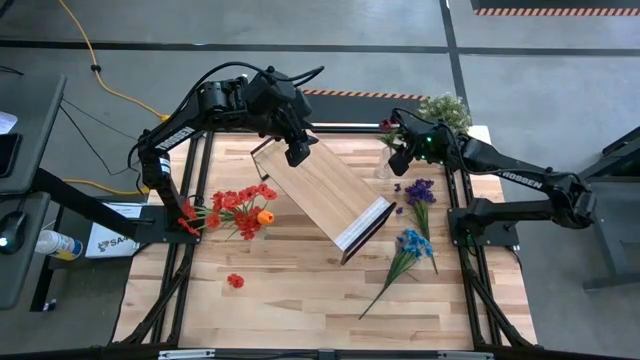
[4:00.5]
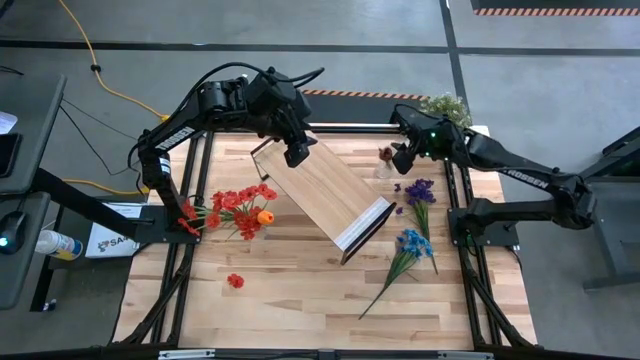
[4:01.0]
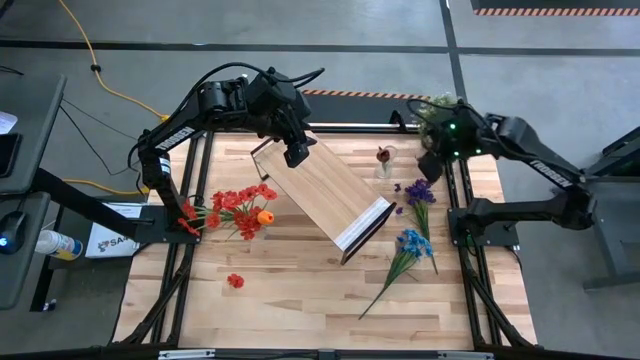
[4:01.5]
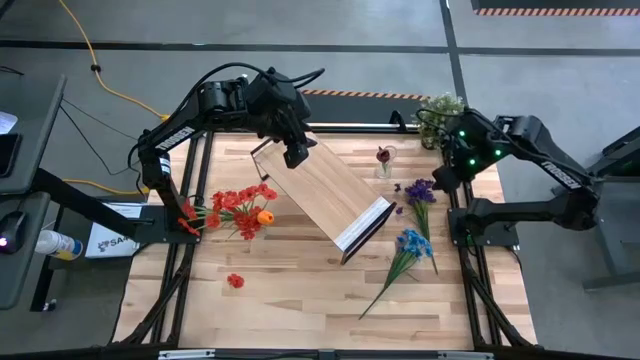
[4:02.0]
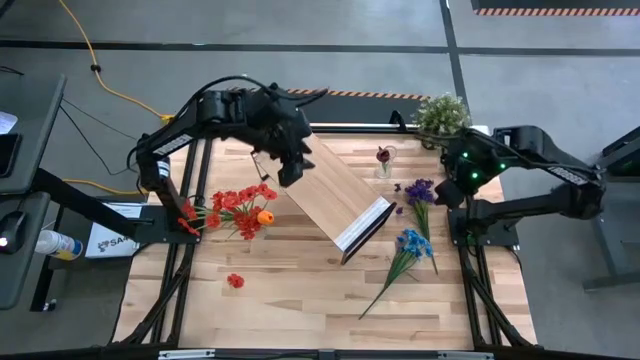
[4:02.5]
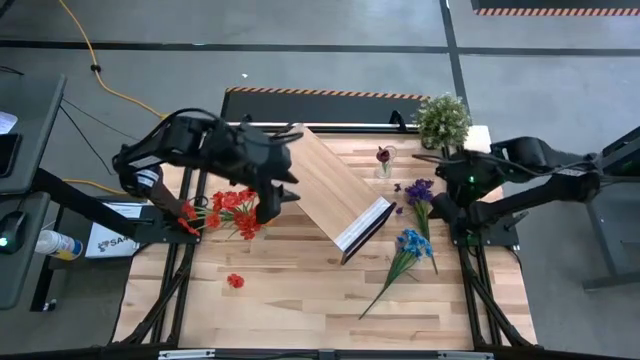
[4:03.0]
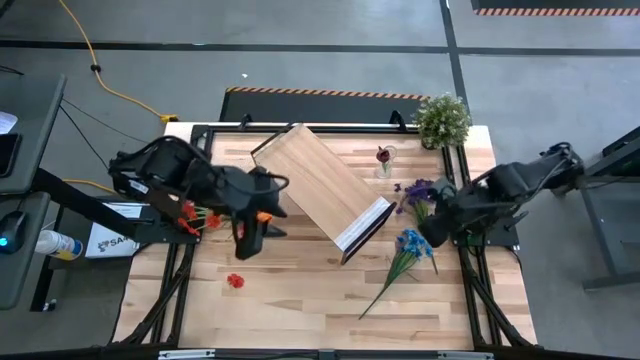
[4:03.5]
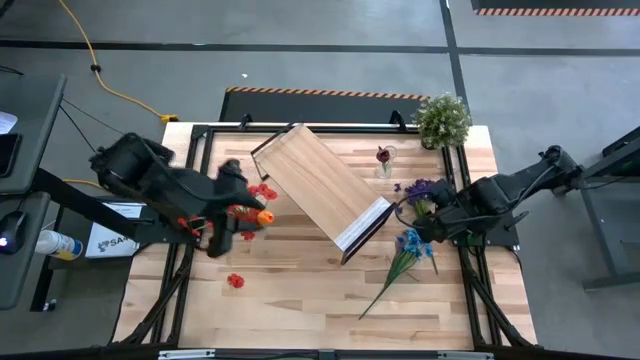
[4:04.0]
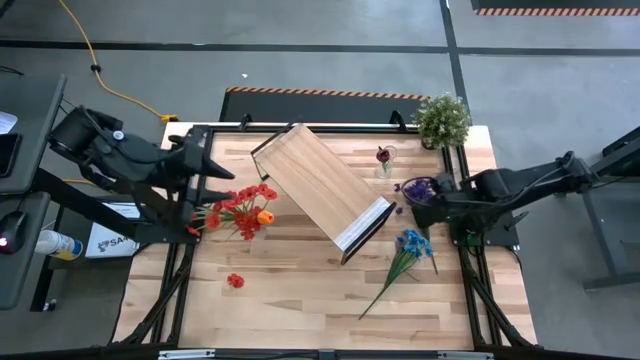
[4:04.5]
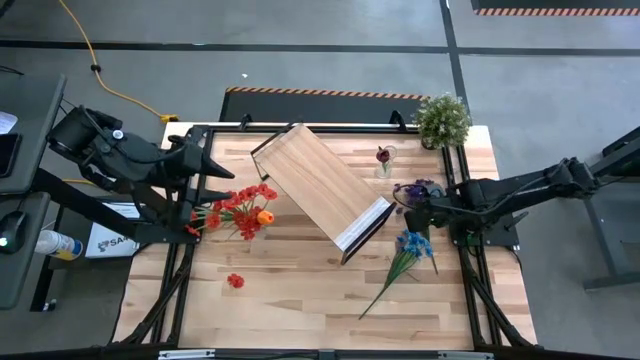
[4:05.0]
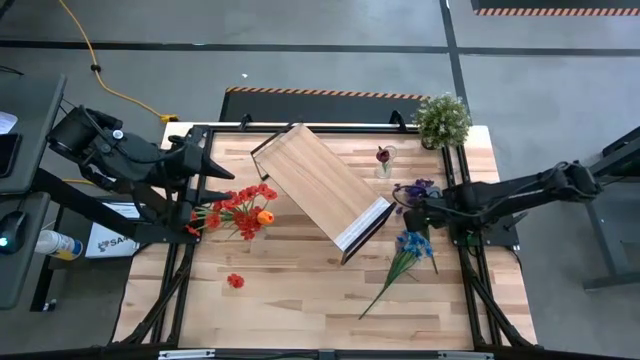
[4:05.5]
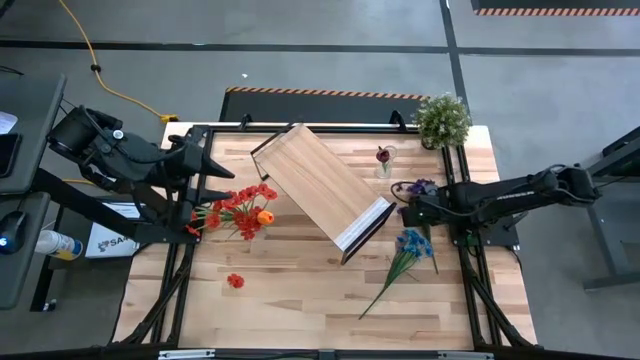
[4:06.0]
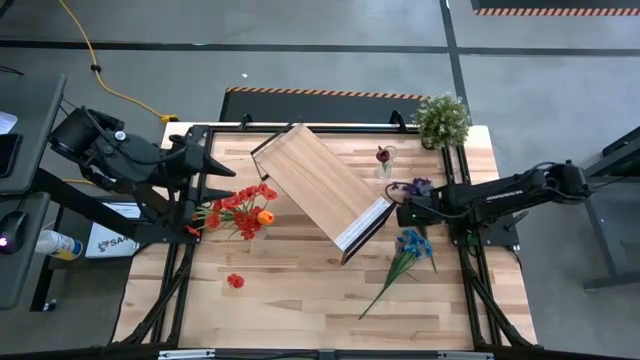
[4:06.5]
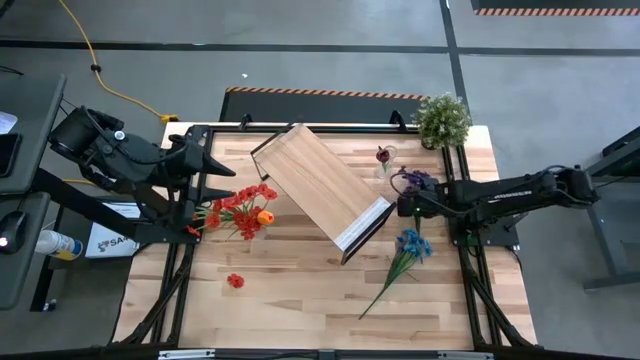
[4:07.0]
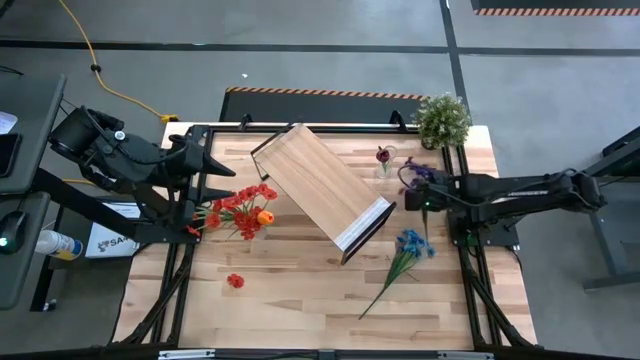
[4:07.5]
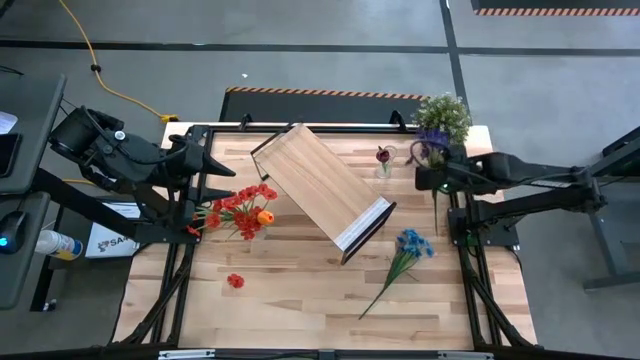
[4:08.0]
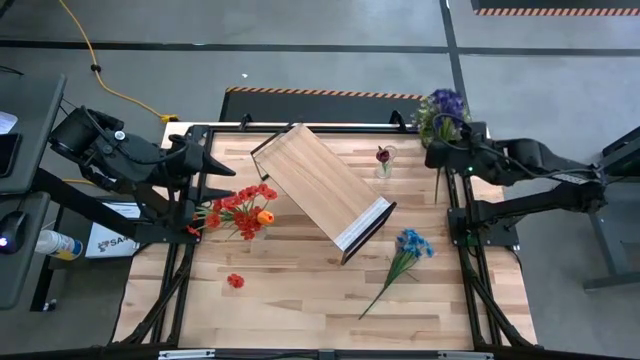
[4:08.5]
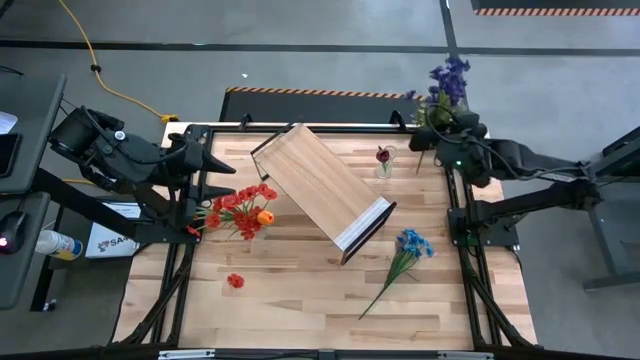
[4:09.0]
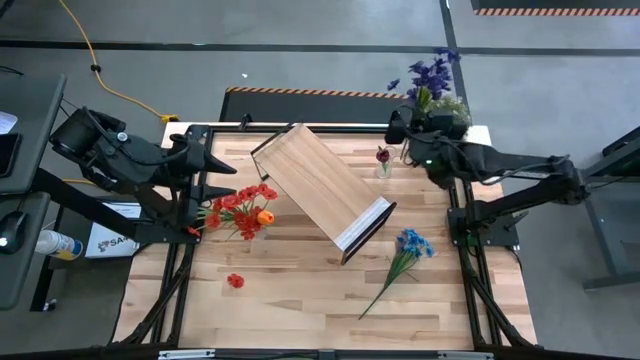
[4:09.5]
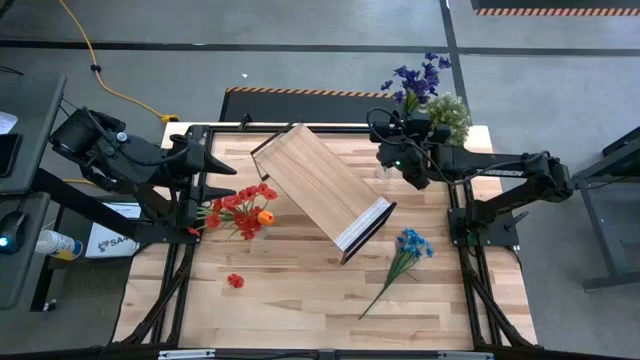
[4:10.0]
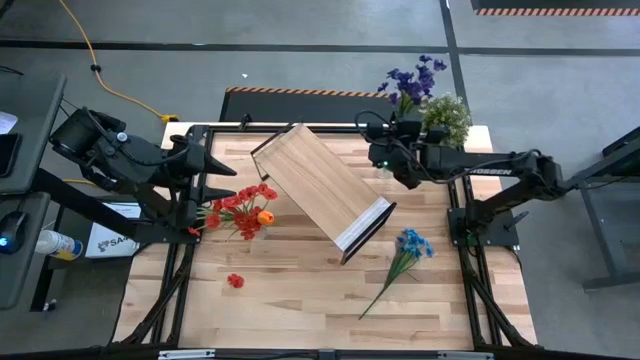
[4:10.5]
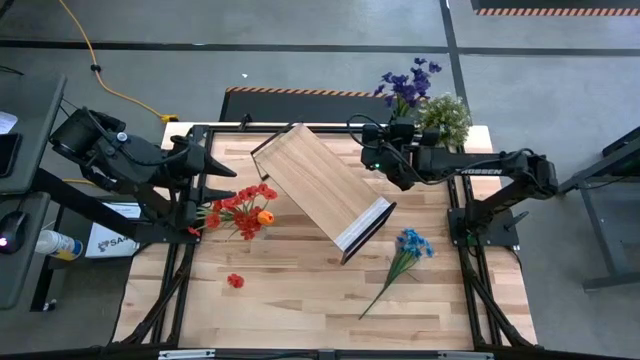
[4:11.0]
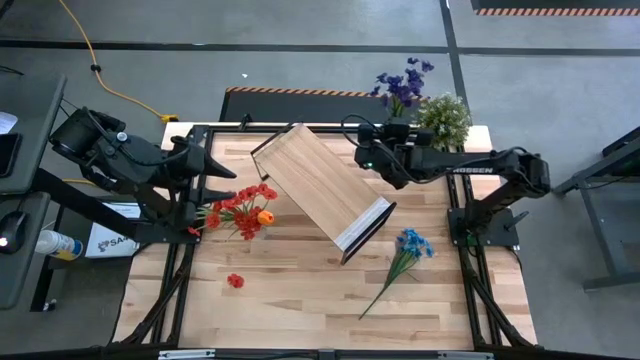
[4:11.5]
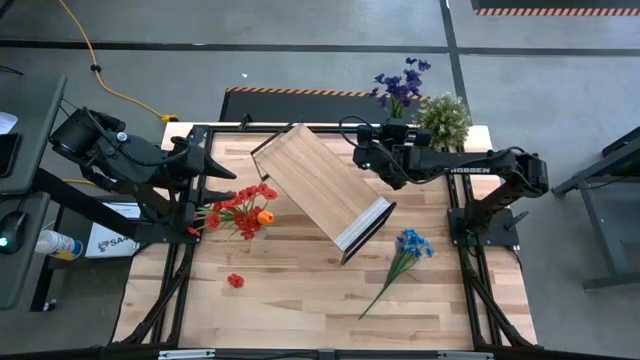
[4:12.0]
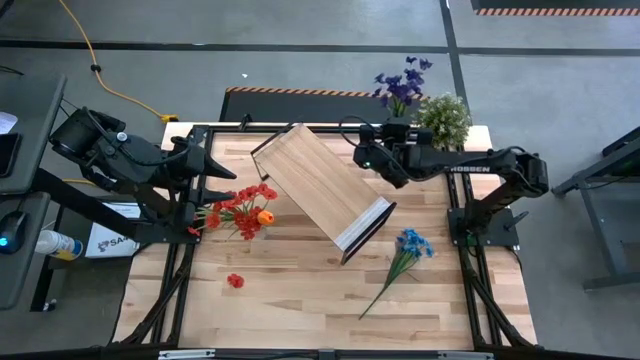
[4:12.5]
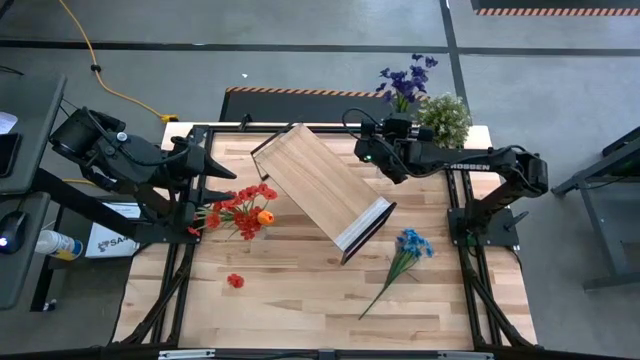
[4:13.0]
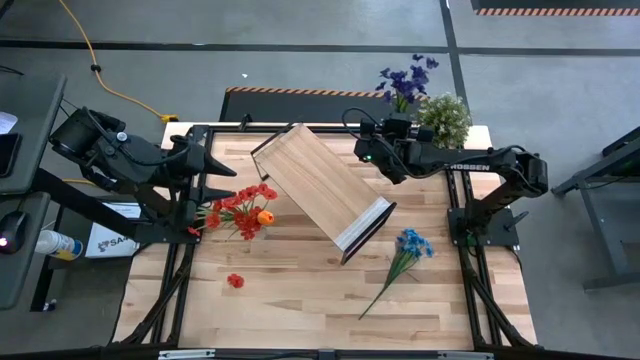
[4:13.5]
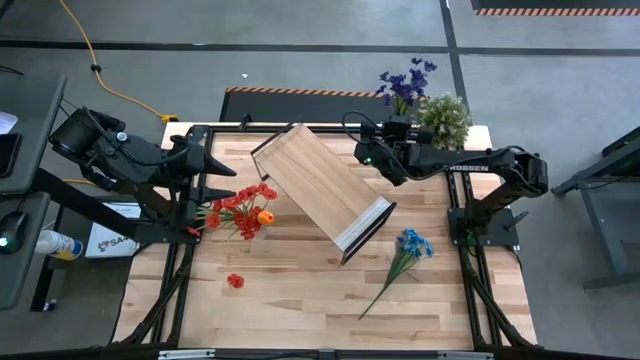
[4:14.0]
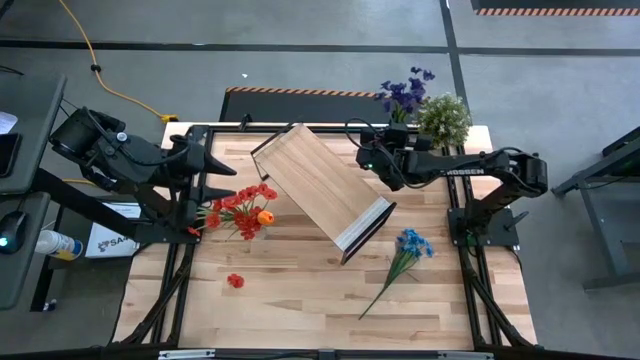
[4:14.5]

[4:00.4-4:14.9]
Task: Pick and place flowers into a vace then onto a shelf
Put the purple flowers into the top transparent vase

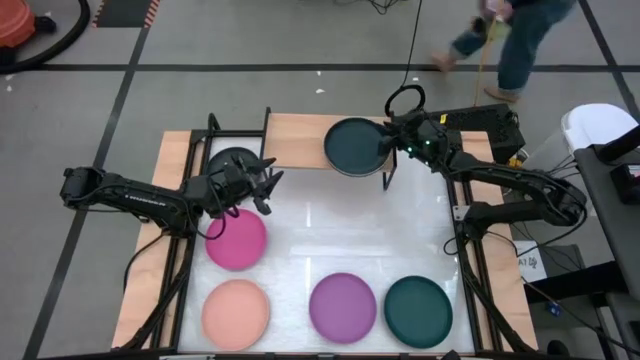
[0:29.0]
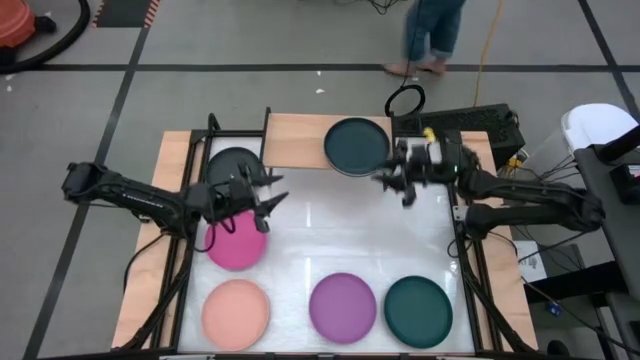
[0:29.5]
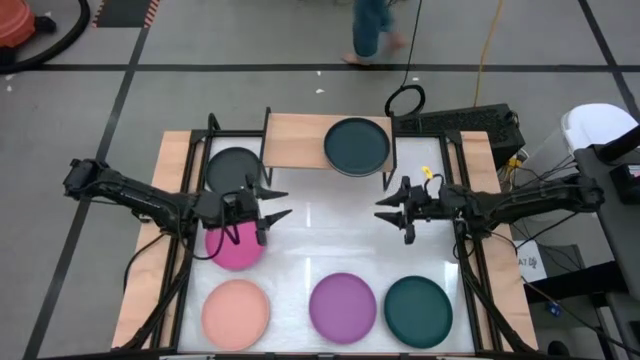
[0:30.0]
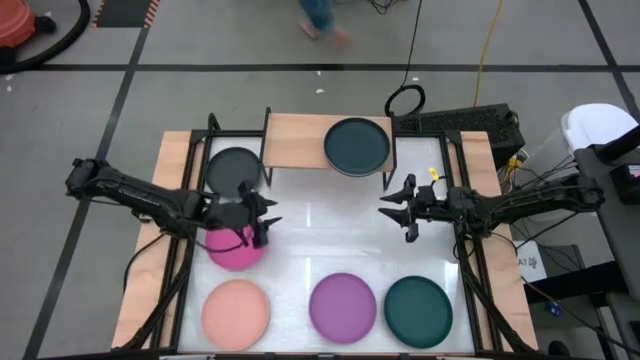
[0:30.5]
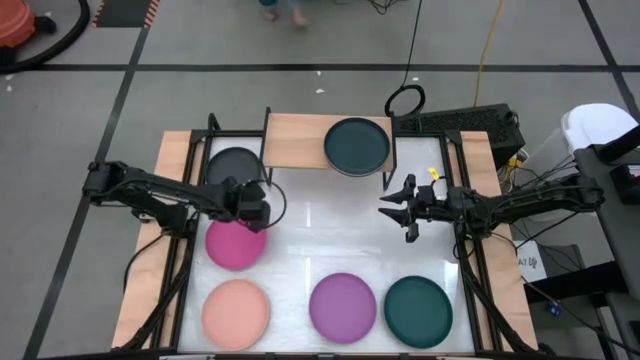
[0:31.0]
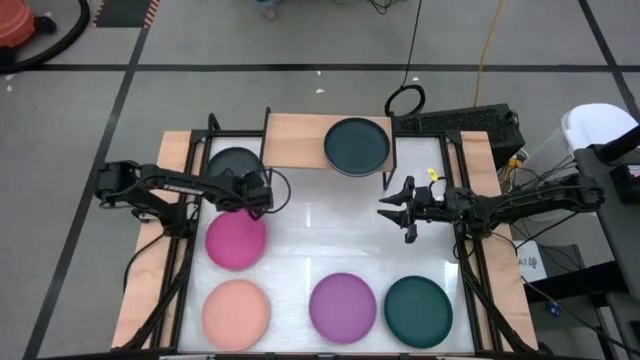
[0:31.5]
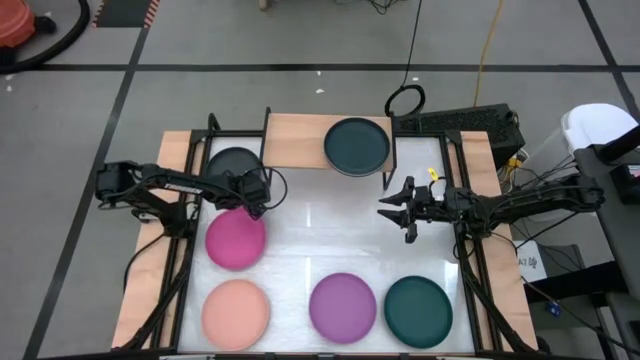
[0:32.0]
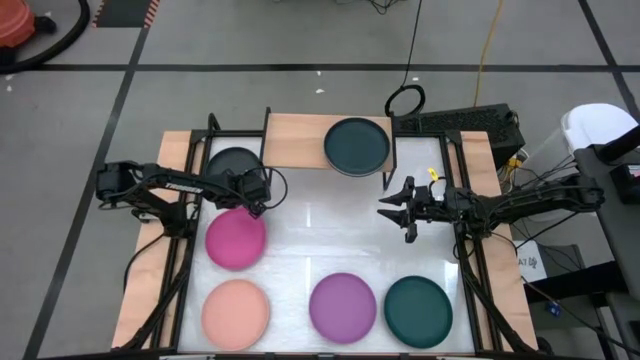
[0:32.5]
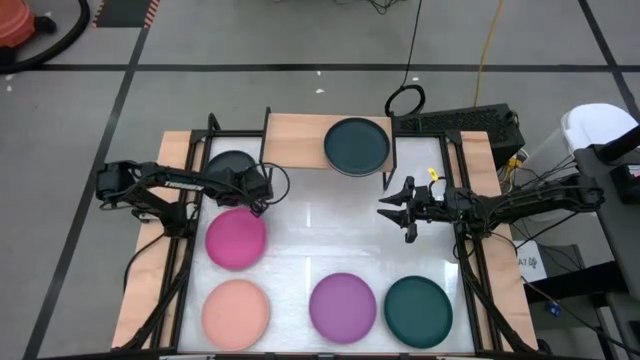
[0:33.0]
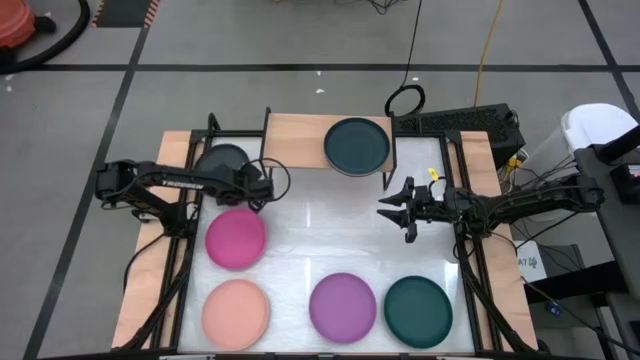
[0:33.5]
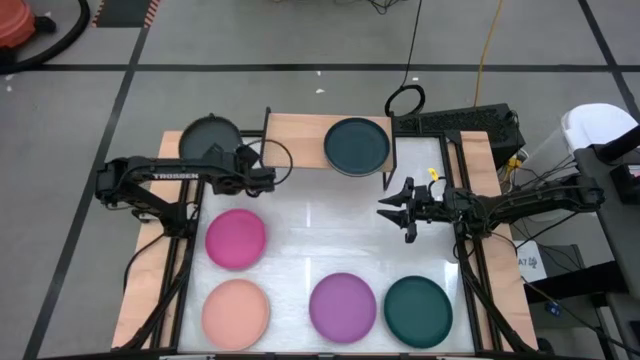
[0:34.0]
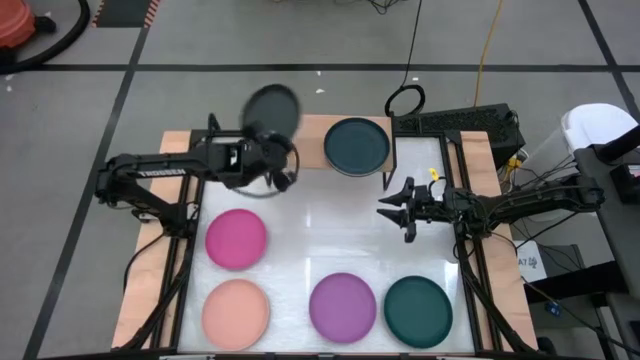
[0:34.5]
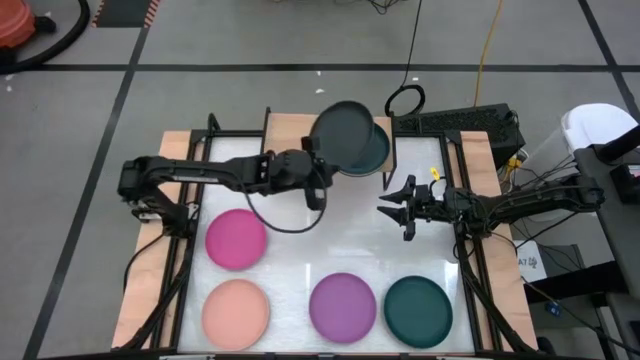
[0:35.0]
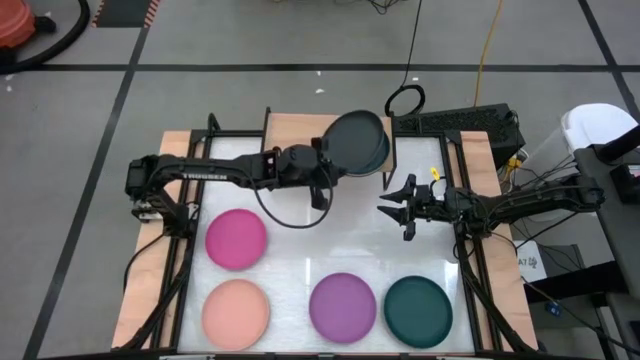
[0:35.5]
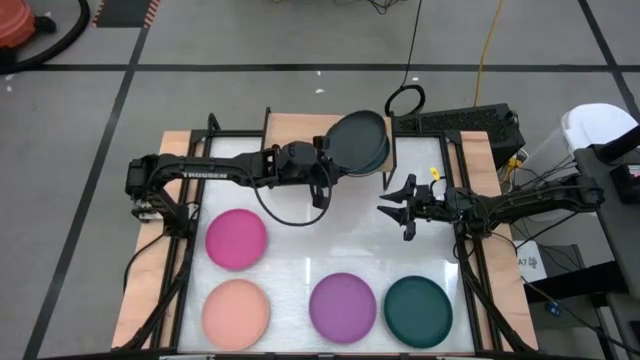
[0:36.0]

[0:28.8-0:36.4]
Task: Place and stack plates onto a shelf
Stack the black plate on top of the dark green plate on the shelf
